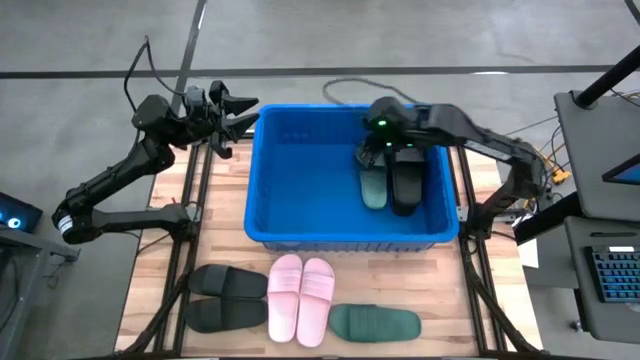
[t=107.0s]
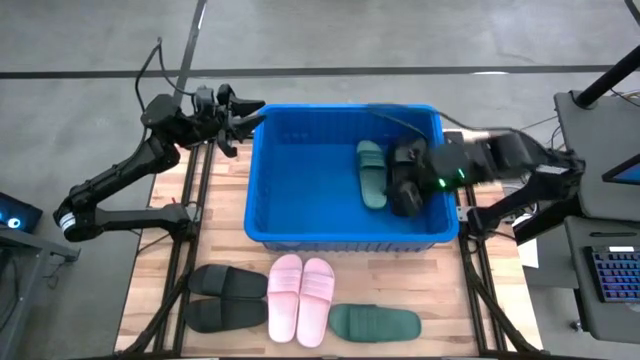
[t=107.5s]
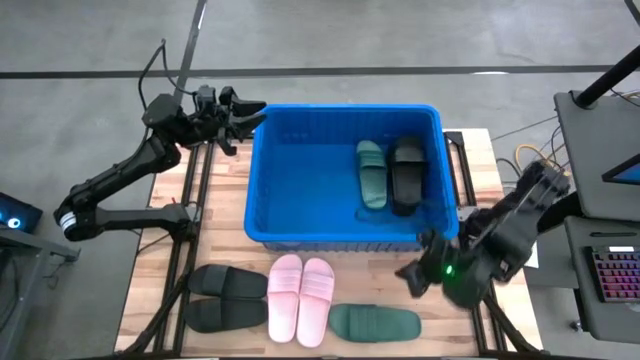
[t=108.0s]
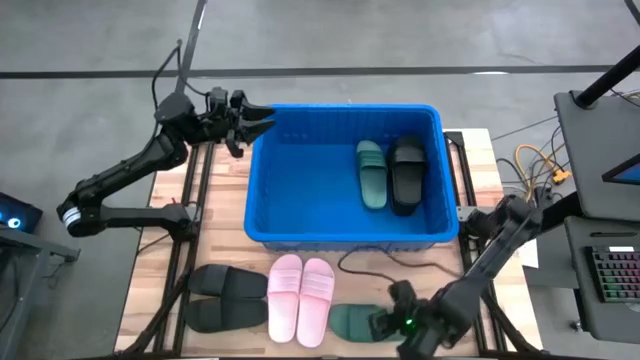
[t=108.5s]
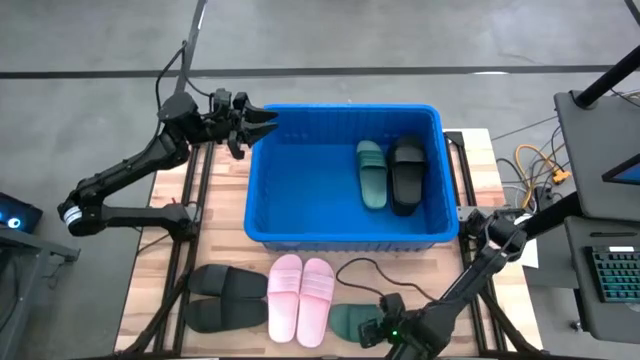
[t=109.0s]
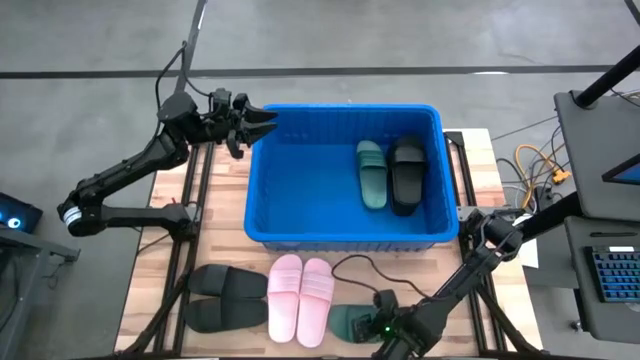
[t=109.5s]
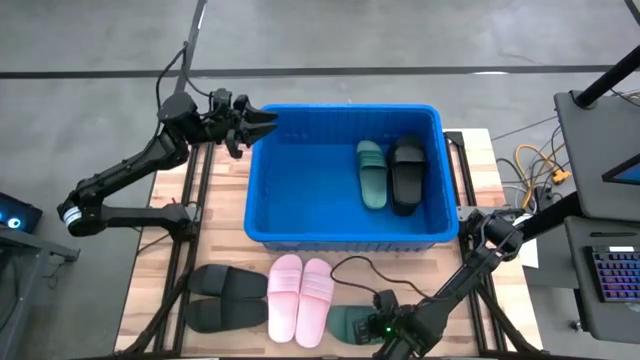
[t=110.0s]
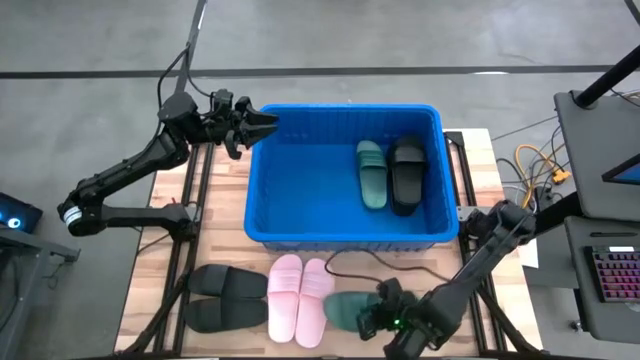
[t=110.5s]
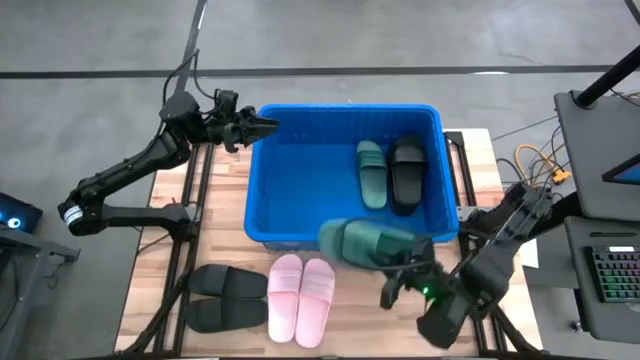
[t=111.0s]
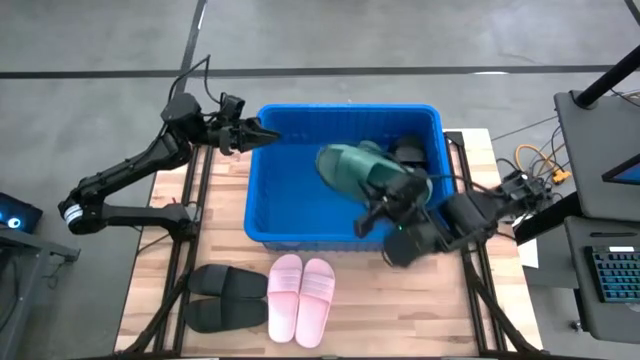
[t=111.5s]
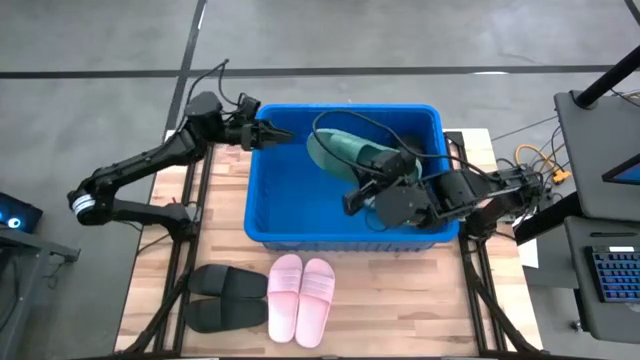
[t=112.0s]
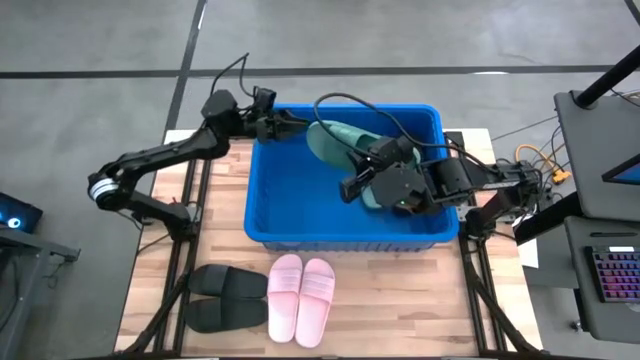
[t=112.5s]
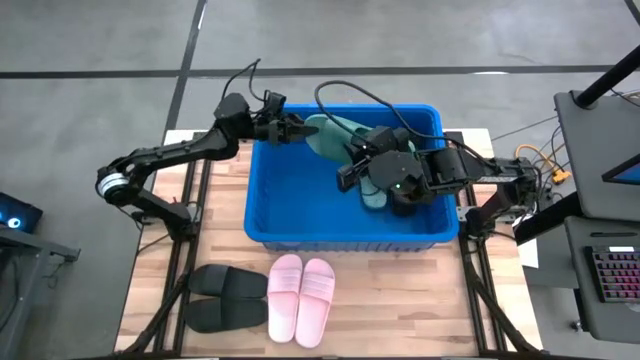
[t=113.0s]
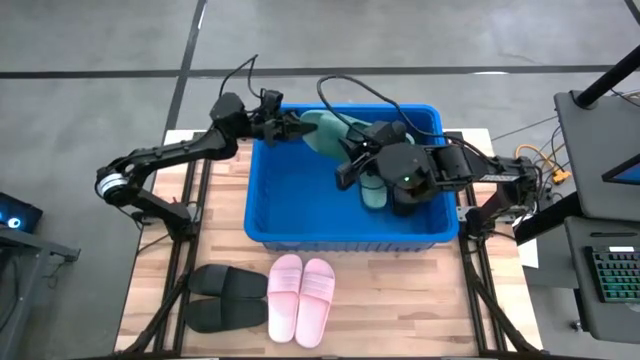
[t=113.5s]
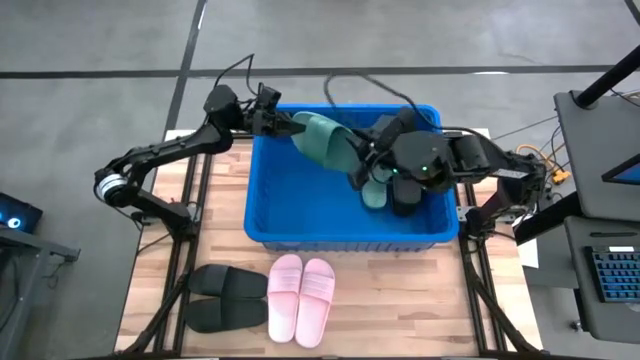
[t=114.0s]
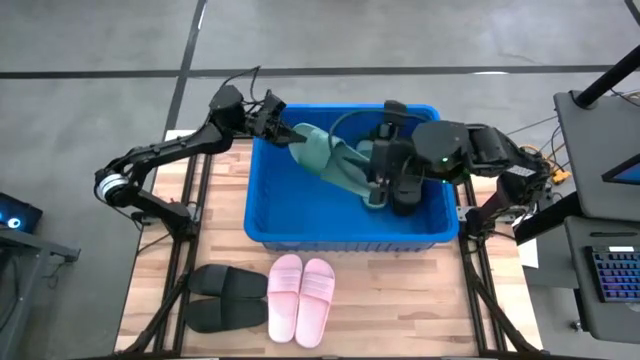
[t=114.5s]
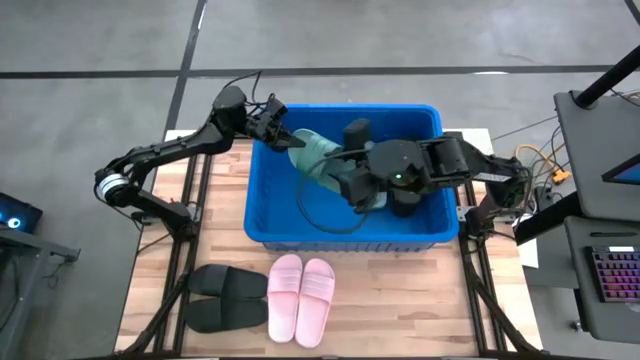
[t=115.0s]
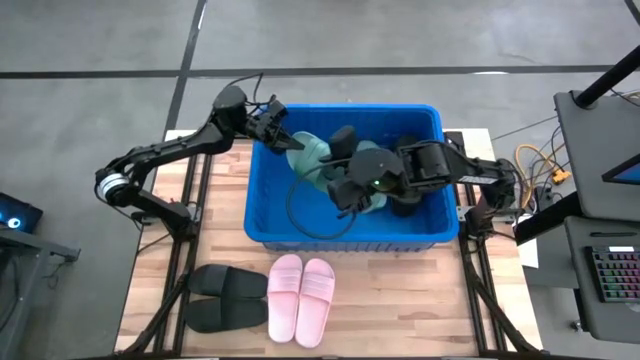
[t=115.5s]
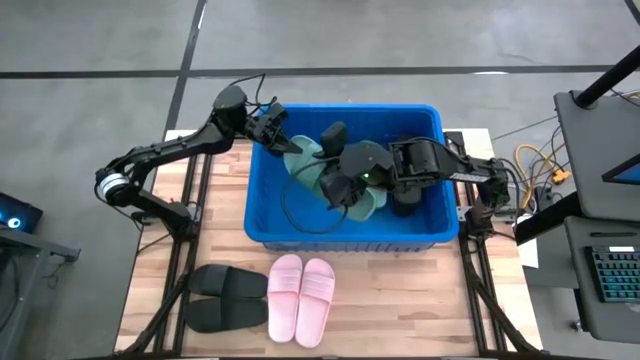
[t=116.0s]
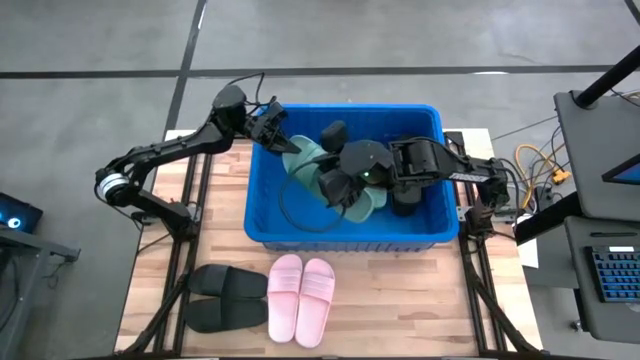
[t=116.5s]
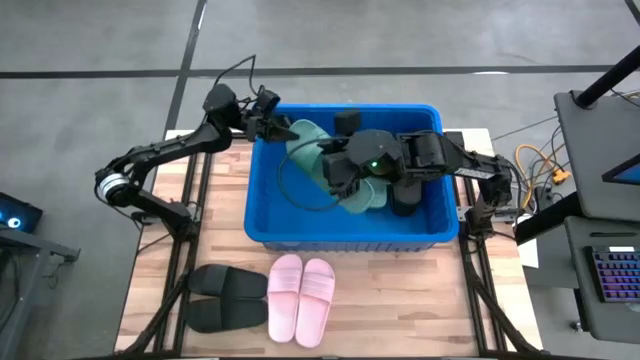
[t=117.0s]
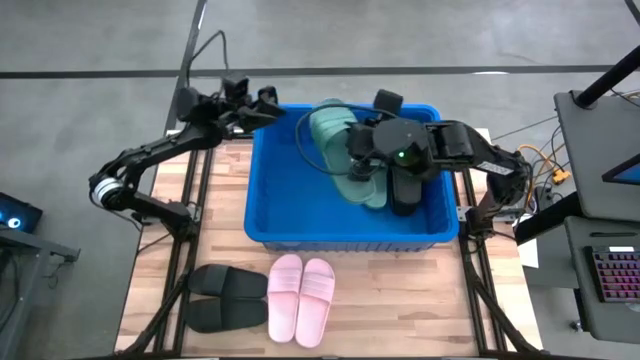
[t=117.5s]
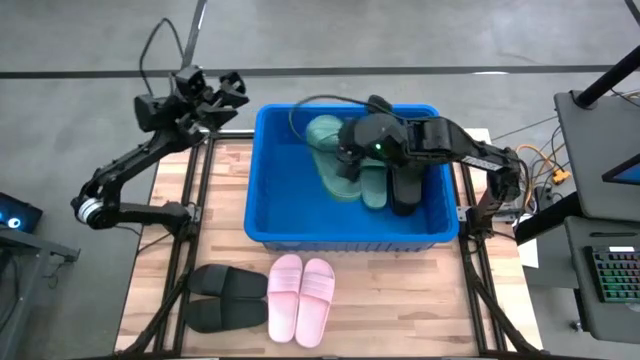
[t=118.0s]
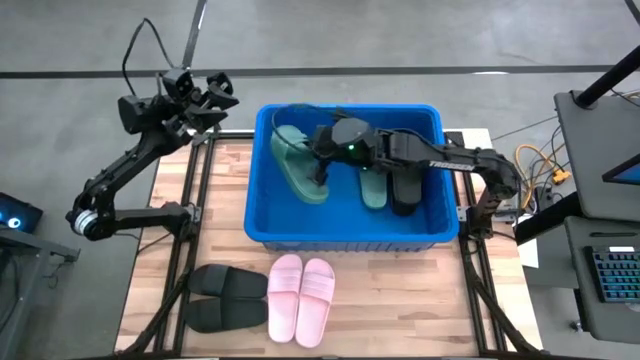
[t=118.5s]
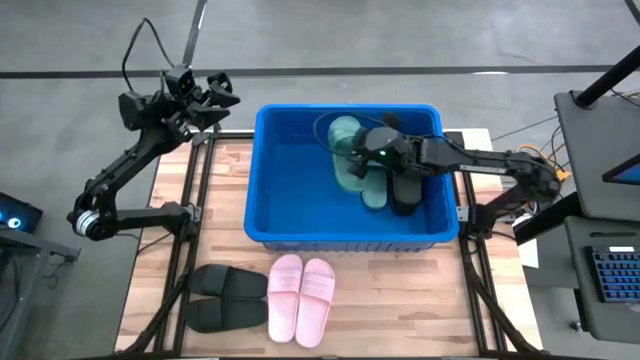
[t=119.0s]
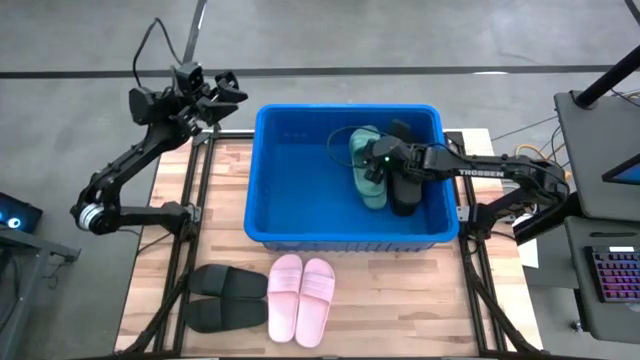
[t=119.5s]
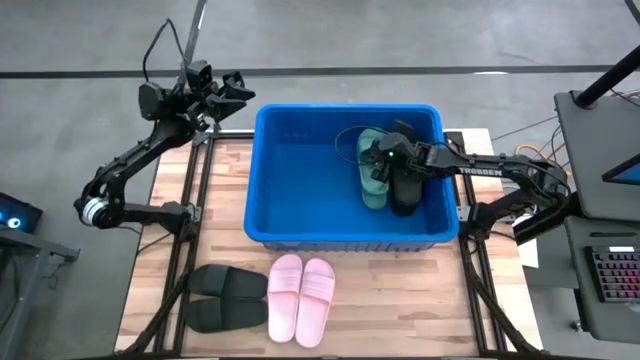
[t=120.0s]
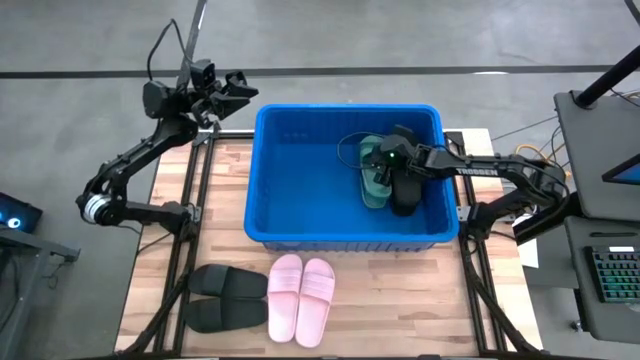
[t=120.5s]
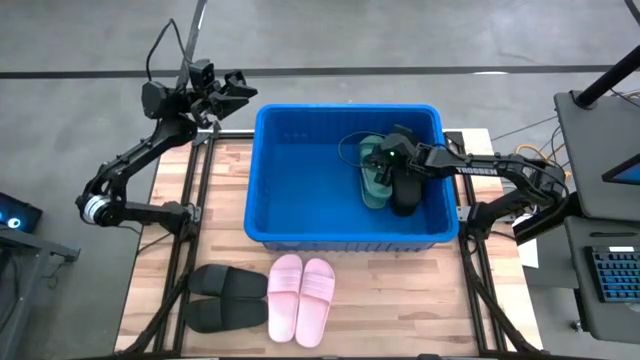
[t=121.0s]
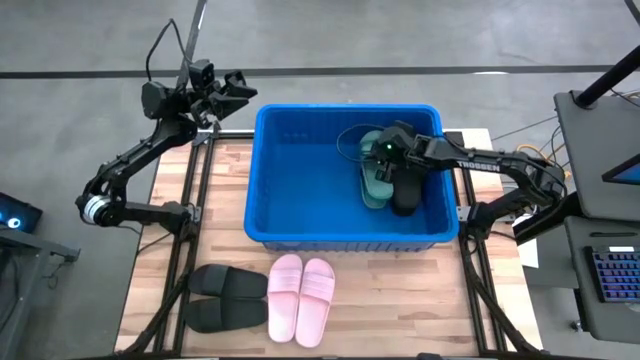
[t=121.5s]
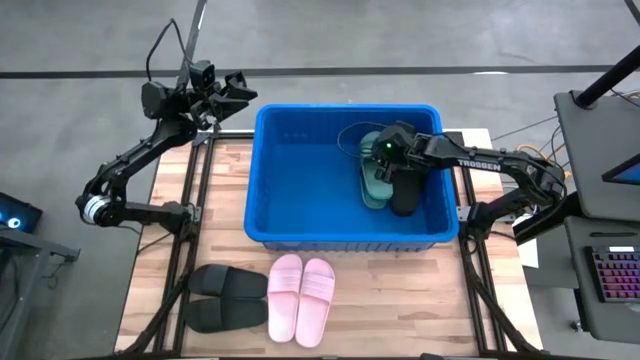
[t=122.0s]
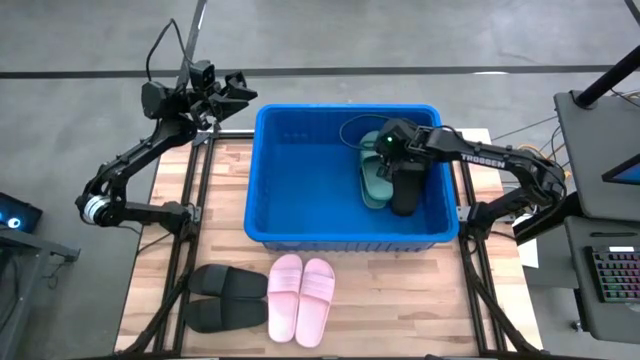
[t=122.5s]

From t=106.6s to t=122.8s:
Task: Pick and place slides into bin
Put the green slide into the blue bin

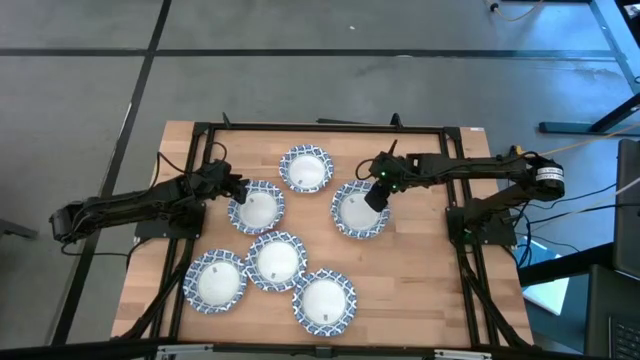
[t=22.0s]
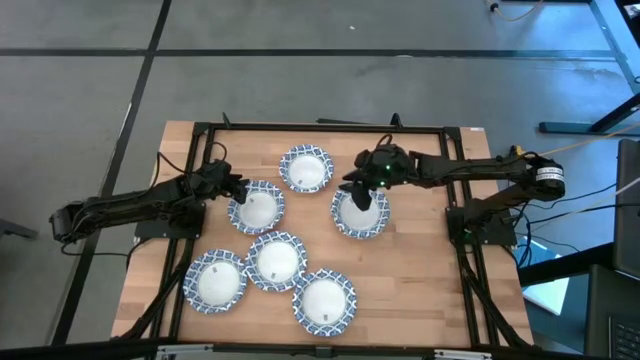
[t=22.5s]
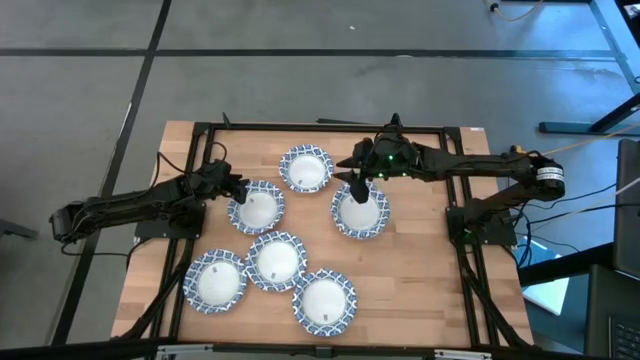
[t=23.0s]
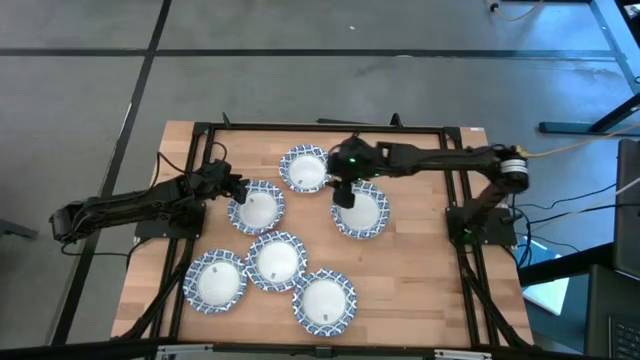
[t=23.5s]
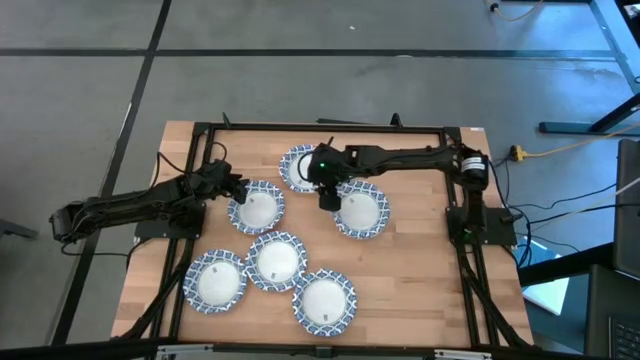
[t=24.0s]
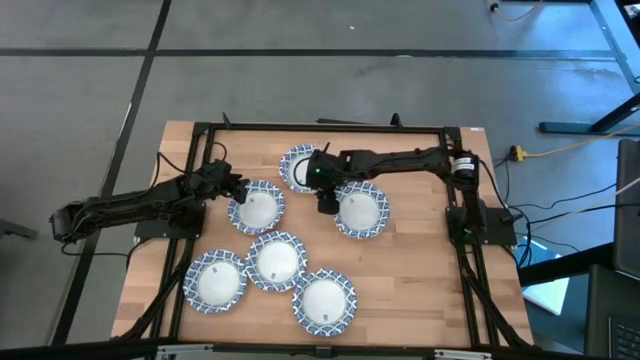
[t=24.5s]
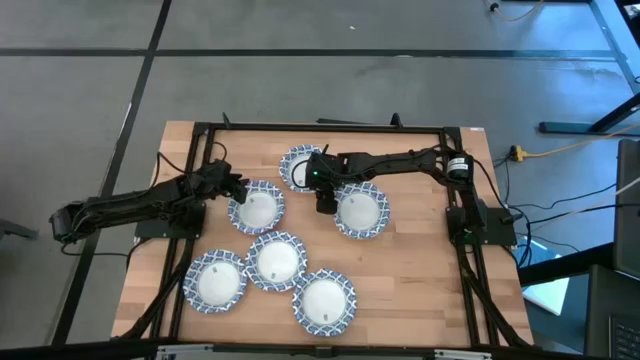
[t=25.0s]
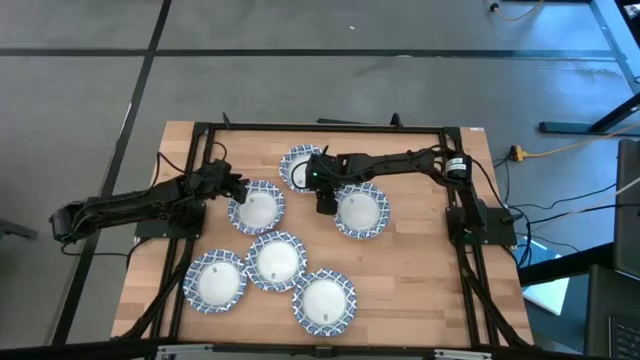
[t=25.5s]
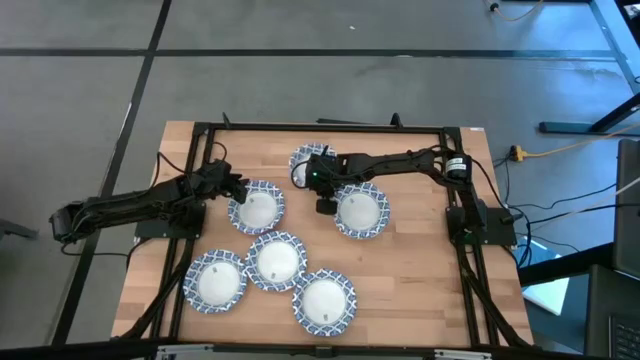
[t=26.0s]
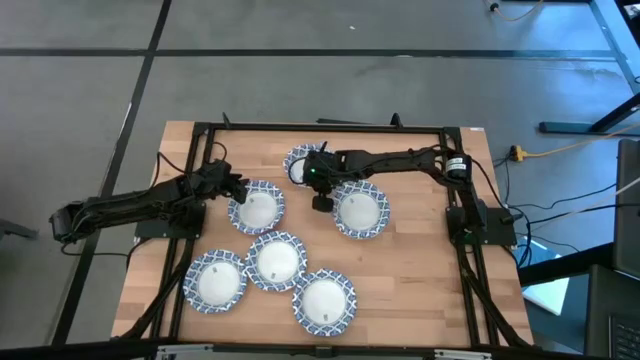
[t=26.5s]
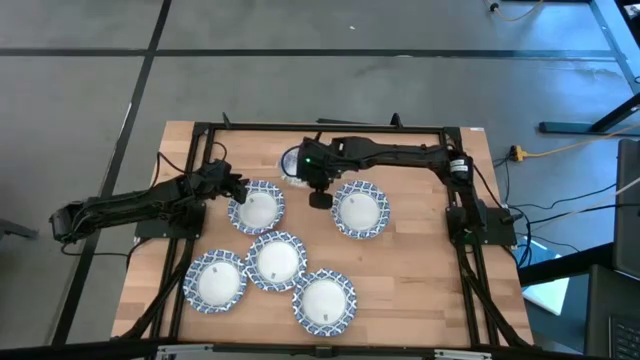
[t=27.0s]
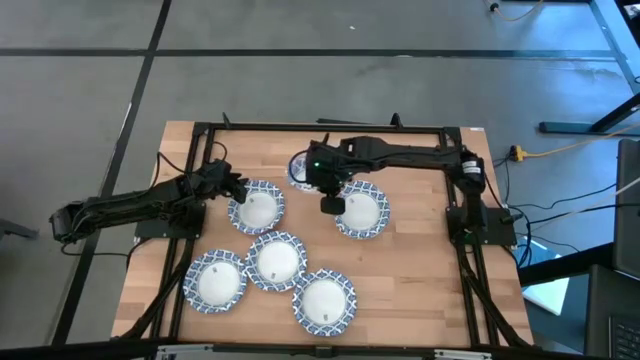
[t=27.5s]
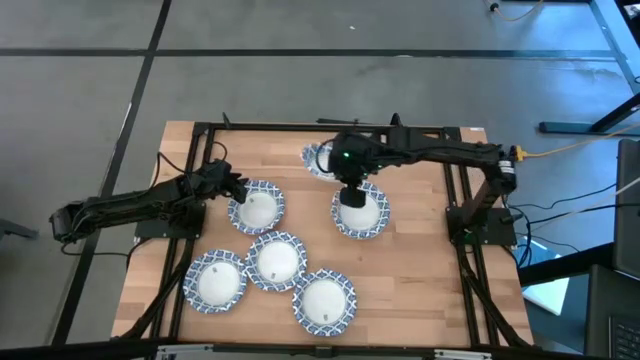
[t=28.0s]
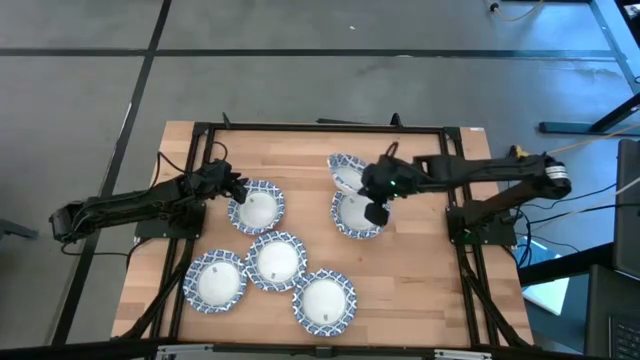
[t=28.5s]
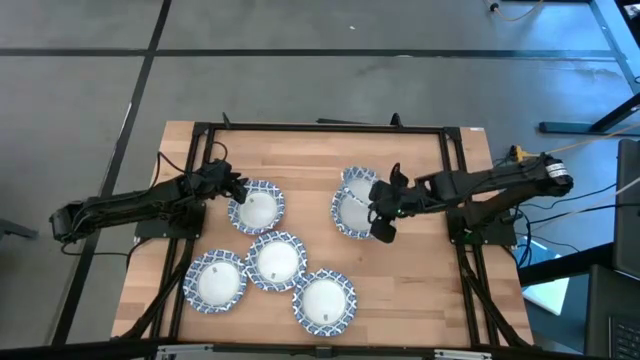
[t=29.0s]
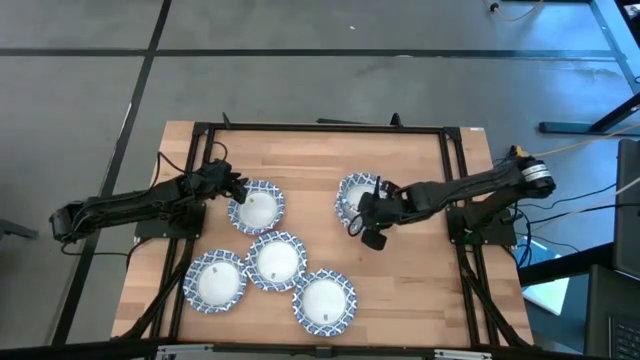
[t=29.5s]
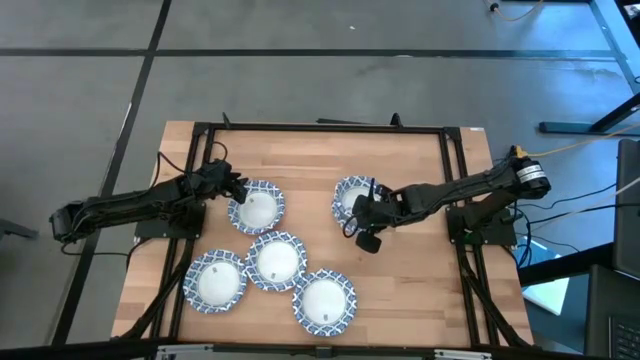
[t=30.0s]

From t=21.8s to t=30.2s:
Task: Nest bowls inside each other
Stack the white patterned bowl on the white patterned bowl
